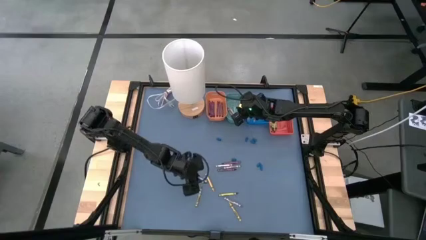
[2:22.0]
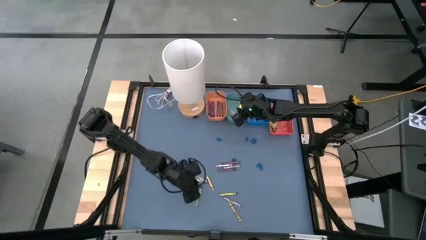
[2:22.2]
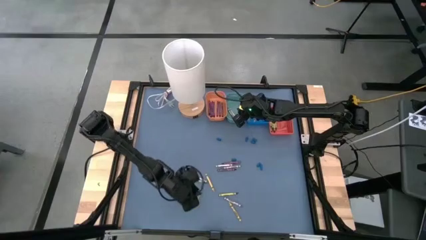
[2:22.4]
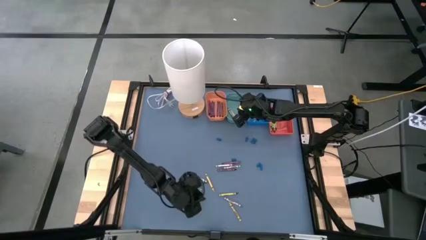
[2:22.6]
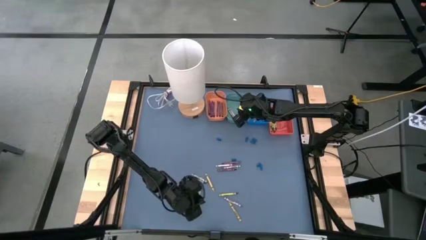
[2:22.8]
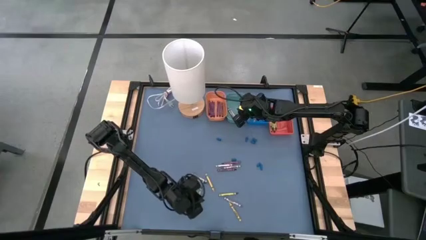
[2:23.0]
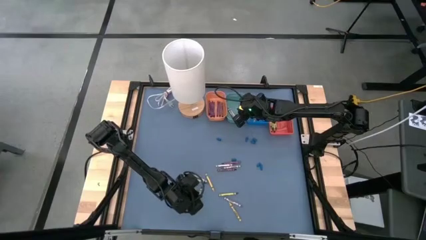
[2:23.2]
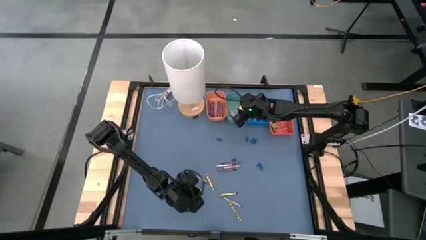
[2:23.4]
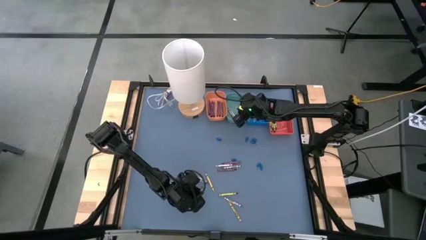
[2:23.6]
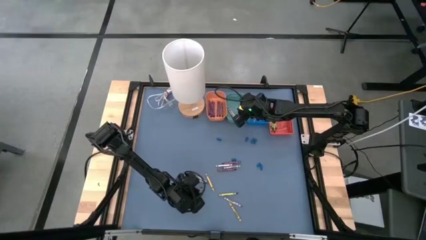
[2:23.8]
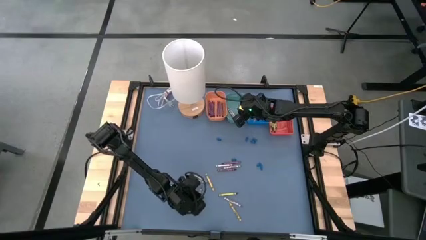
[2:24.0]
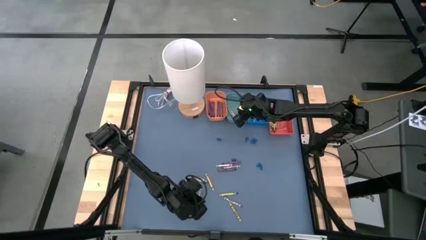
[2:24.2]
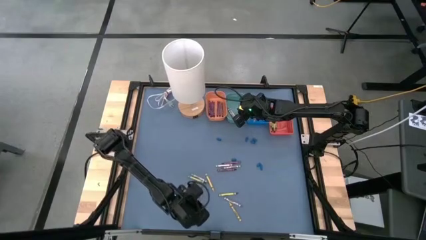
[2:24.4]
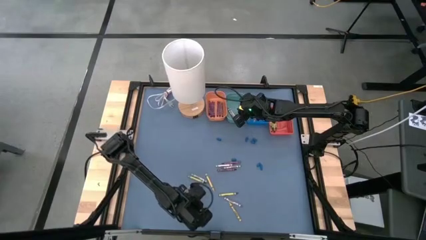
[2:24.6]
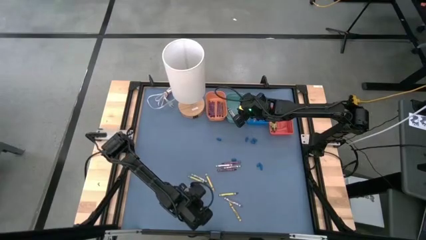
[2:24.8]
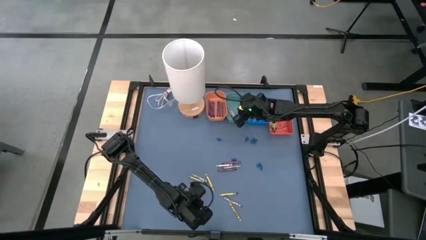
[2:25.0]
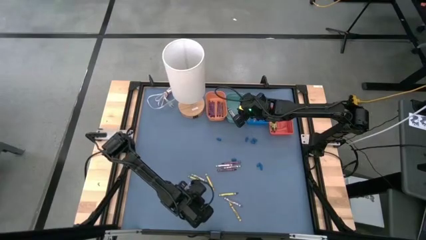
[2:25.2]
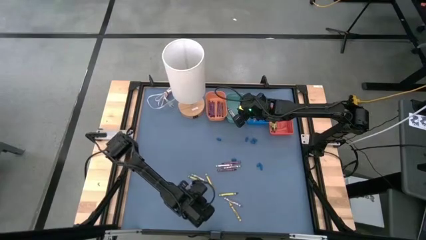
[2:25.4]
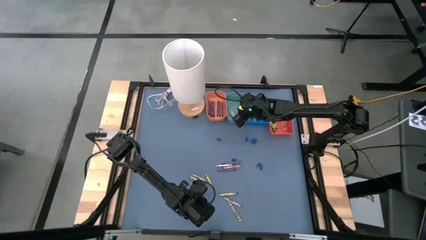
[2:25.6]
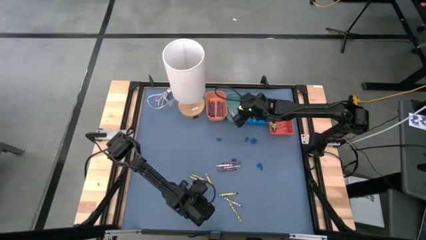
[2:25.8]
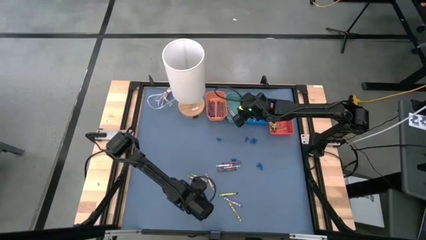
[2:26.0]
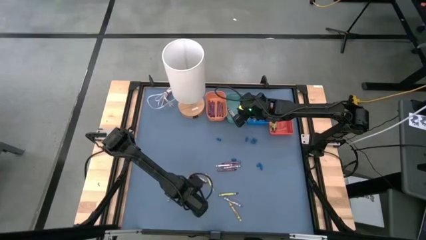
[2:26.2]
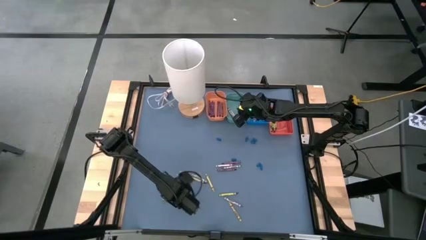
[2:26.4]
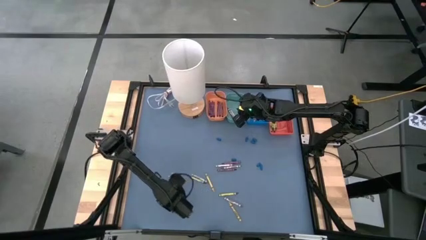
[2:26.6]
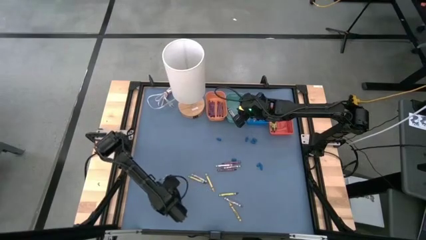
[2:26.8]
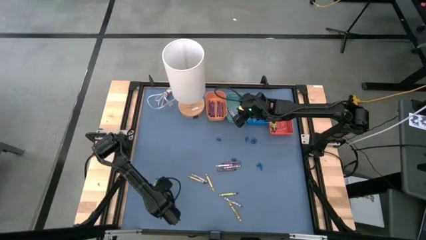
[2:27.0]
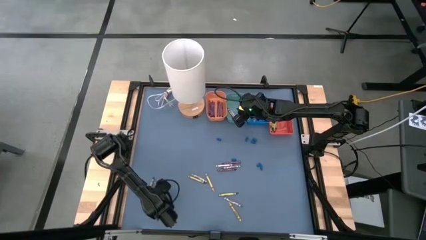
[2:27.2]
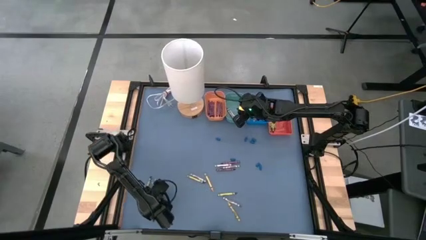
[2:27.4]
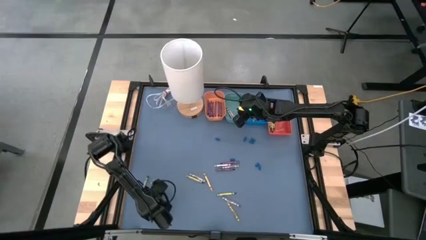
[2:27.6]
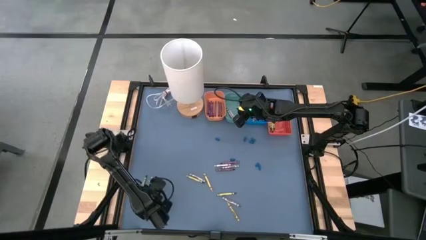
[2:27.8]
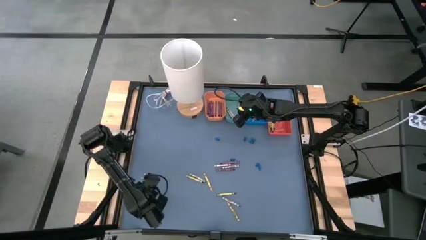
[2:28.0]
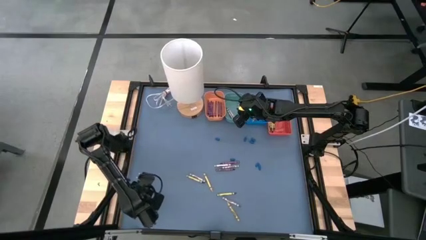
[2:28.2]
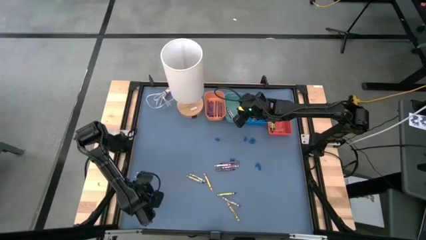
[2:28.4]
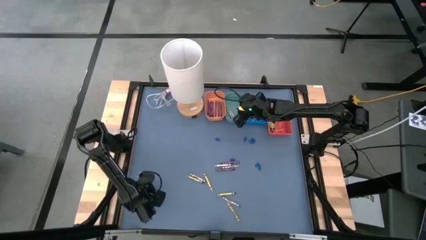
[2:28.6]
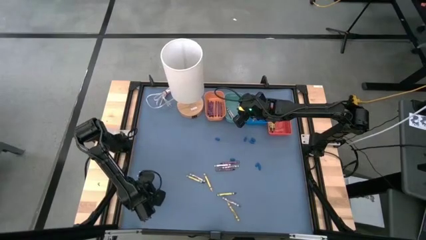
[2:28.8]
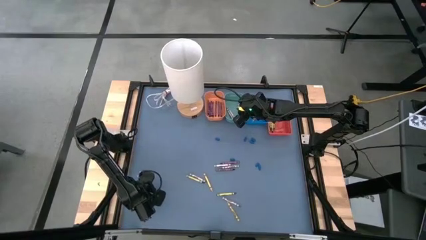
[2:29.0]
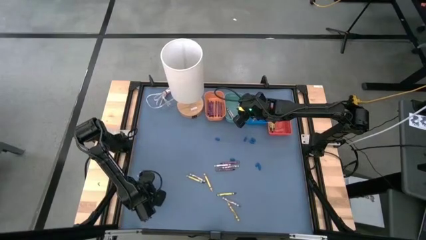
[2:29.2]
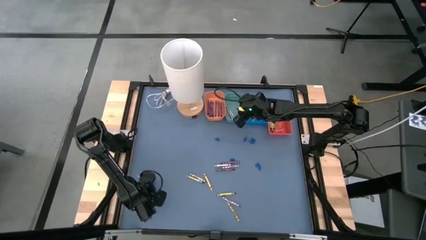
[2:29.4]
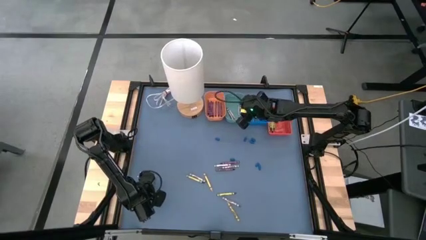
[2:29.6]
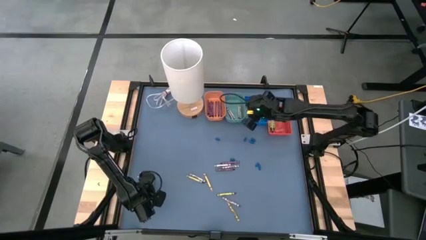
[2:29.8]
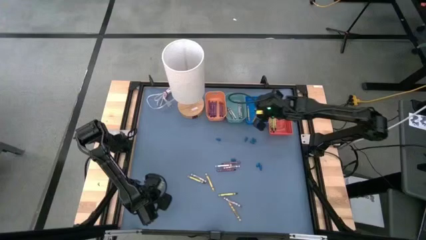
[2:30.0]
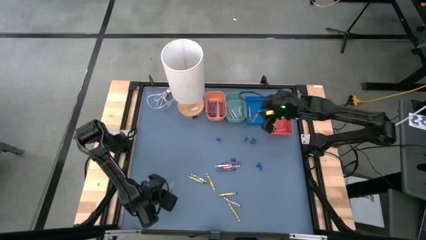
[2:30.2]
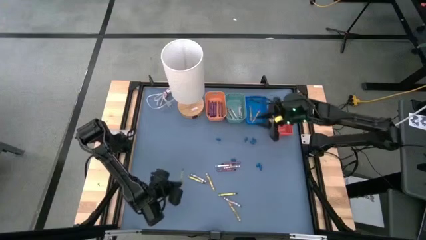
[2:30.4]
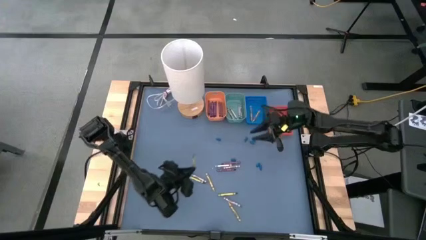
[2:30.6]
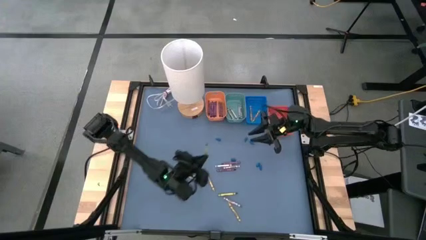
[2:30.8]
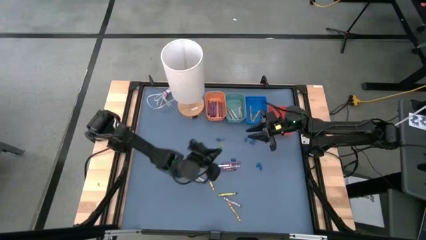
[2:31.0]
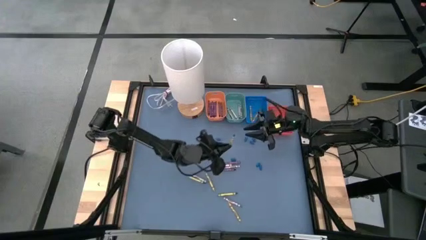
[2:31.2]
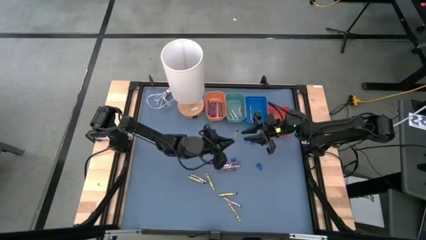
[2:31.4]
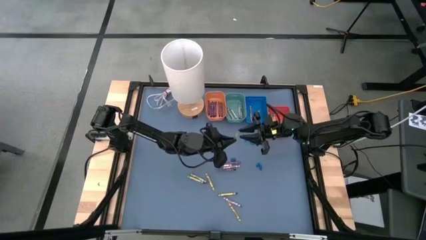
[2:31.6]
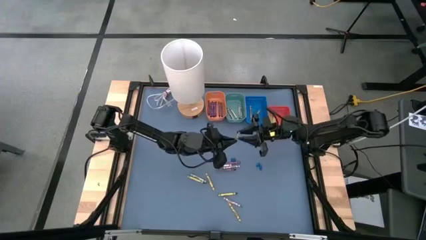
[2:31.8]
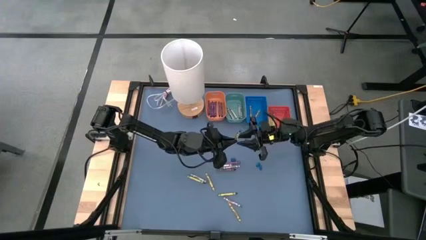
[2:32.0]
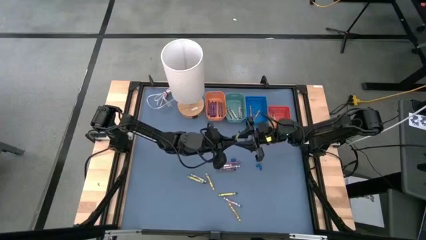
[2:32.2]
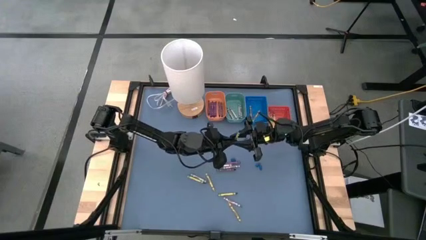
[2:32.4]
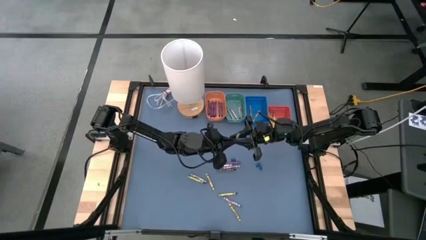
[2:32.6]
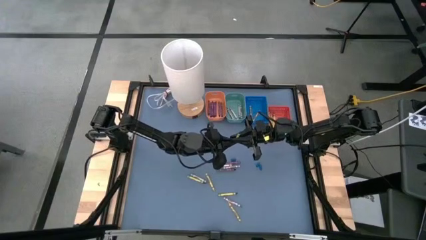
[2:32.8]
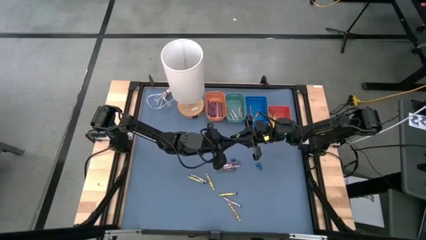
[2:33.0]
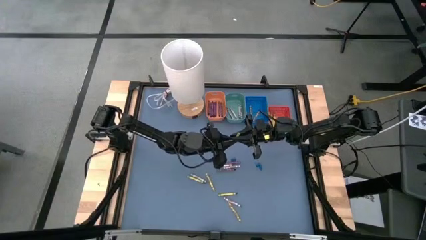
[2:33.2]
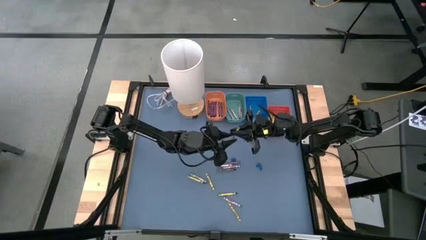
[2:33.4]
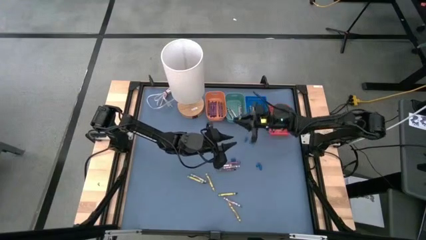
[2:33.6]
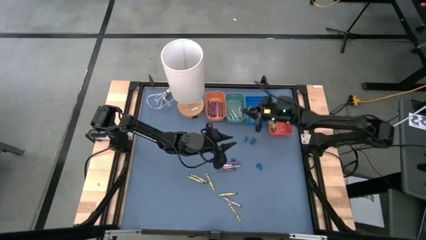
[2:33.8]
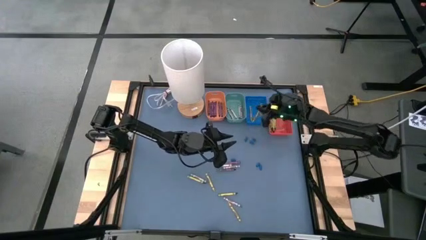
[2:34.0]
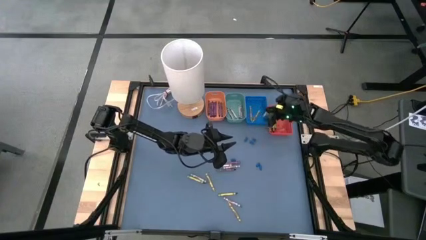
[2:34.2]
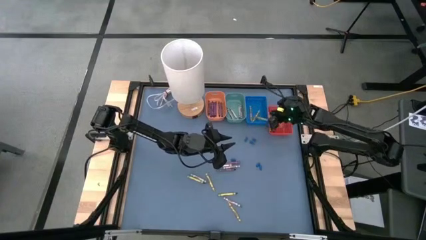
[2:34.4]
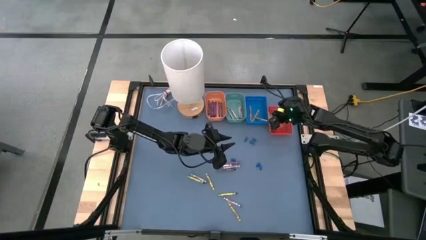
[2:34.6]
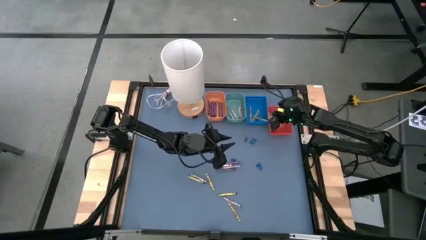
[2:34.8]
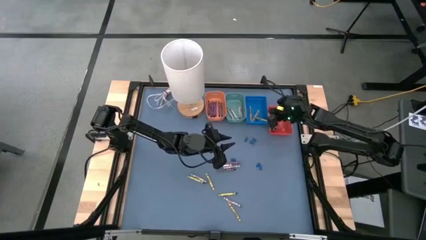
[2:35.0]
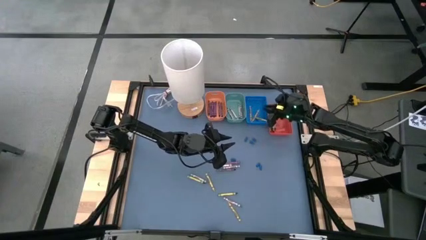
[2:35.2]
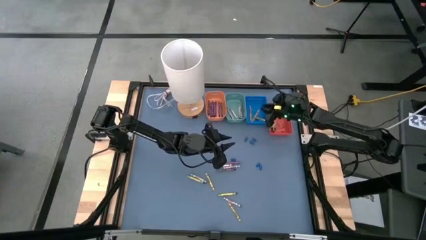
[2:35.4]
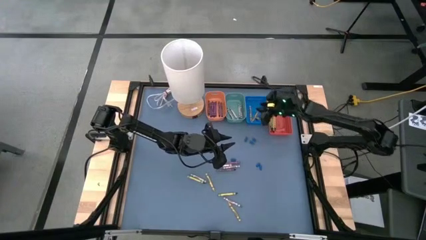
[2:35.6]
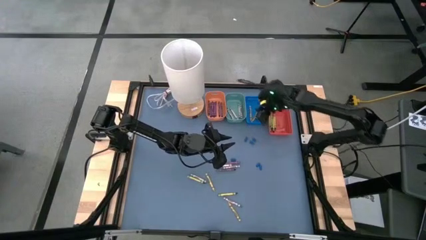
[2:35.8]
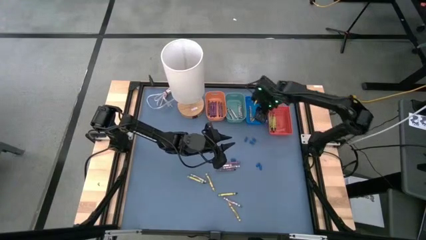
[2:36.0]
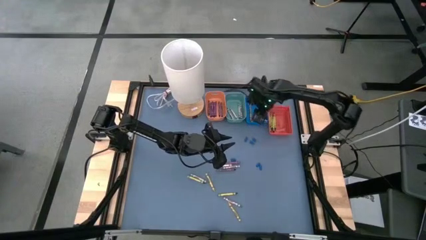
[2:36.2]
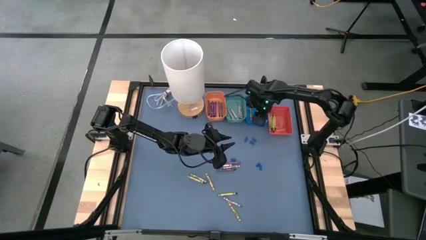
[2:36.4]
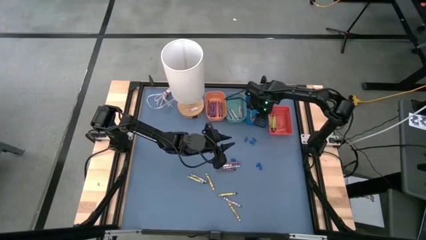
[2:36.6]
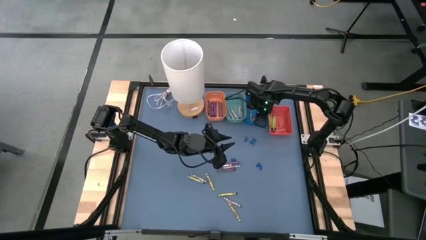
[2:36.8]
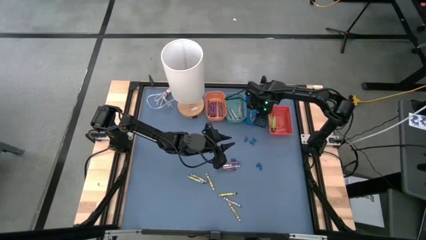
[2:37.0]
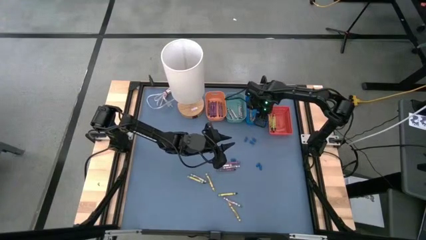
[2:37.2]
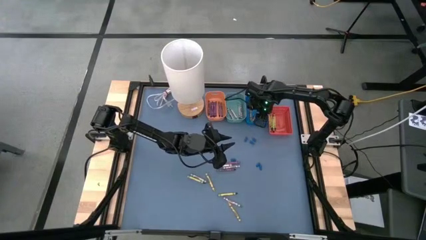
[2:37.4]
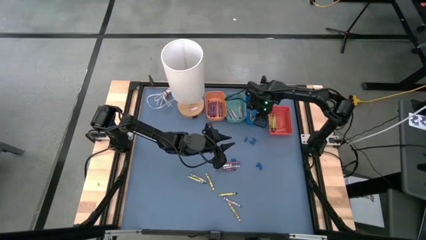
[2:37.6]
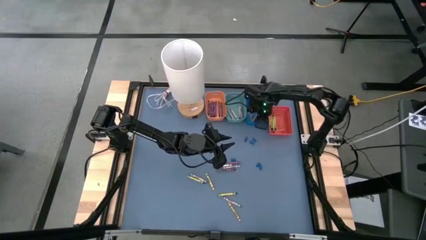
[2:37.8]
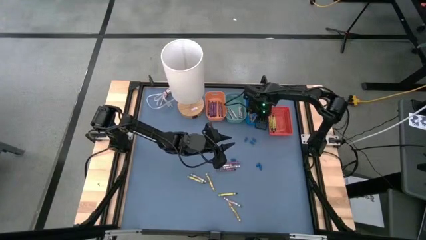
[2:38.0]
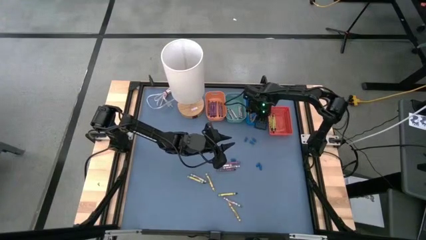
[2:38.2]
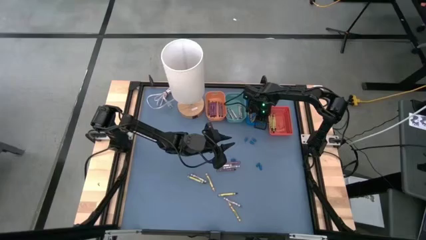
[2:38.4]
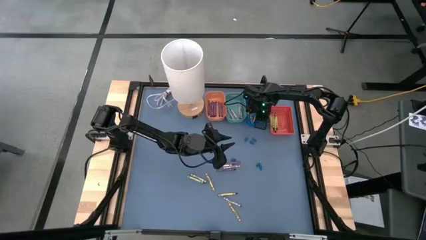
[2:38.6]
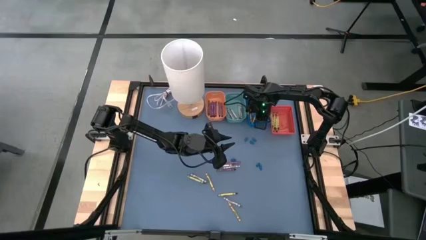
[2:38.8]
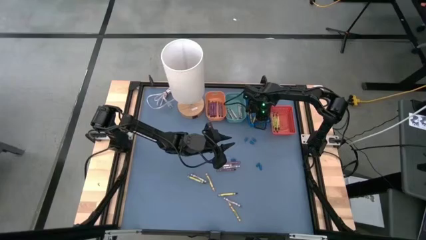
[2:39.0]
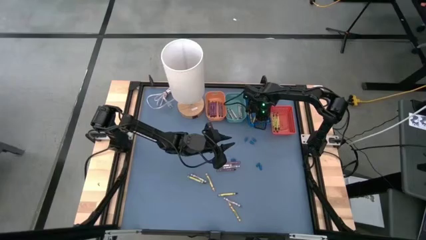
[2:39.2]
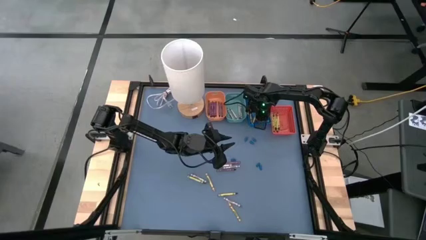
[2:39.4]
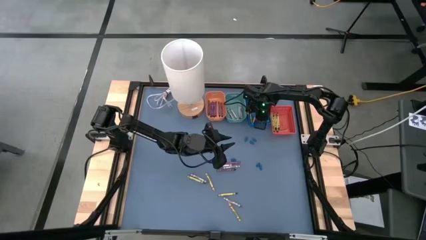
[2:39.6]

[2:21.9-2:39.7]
Task: Sort crayons
Put the green crayon into the orange bin
